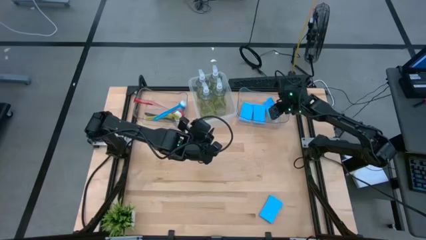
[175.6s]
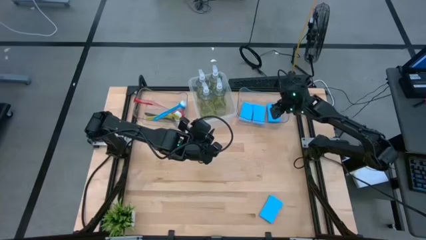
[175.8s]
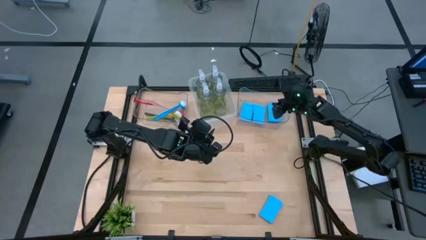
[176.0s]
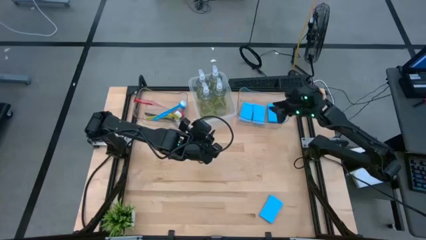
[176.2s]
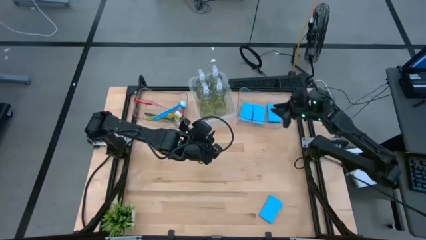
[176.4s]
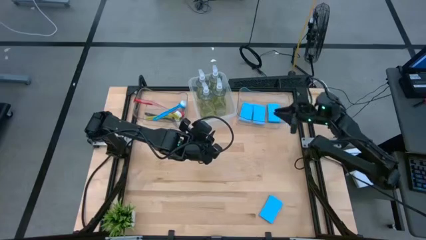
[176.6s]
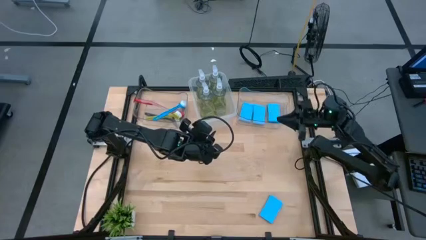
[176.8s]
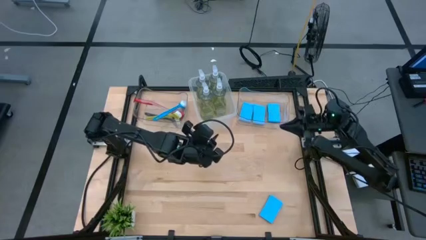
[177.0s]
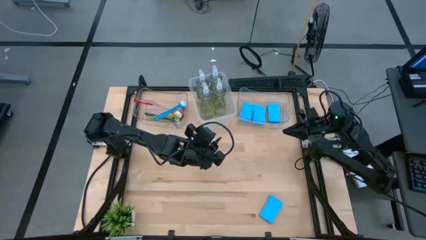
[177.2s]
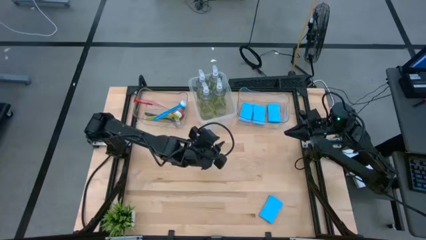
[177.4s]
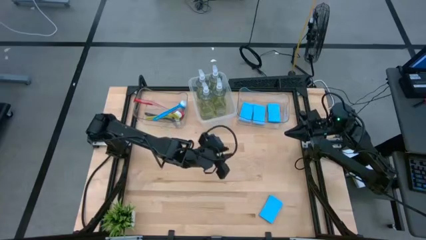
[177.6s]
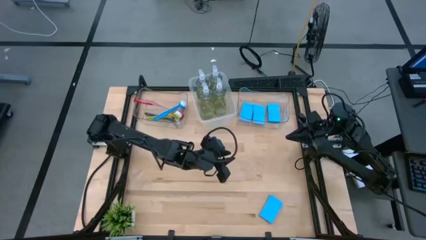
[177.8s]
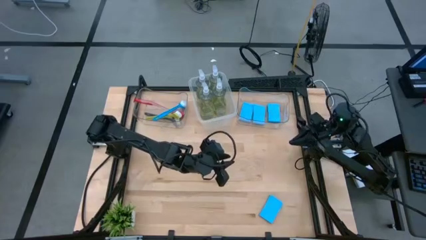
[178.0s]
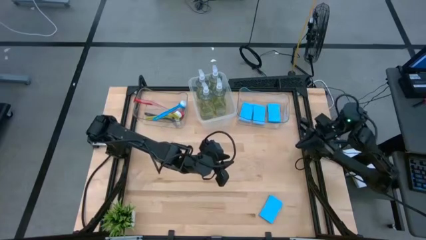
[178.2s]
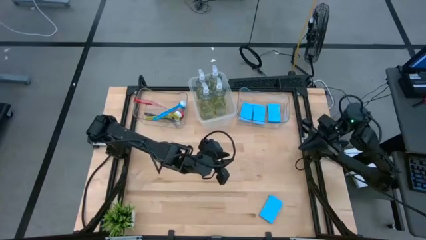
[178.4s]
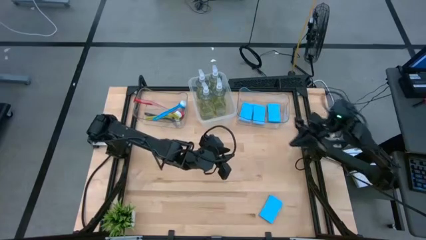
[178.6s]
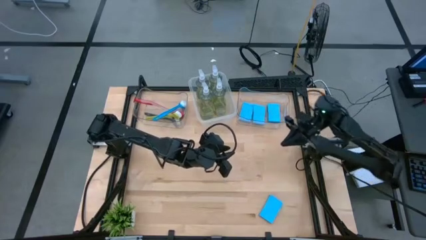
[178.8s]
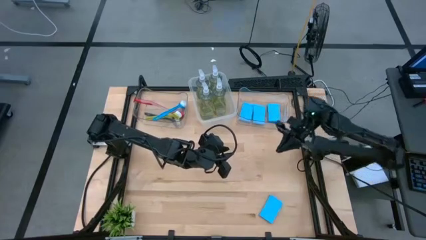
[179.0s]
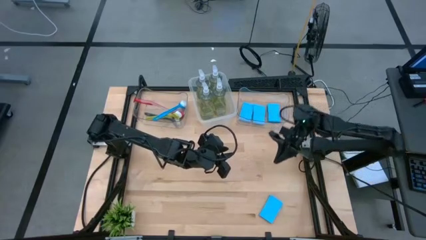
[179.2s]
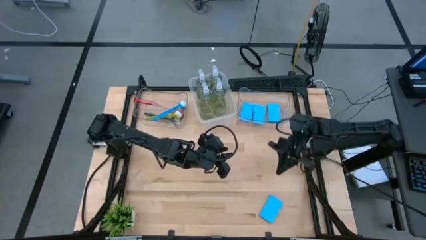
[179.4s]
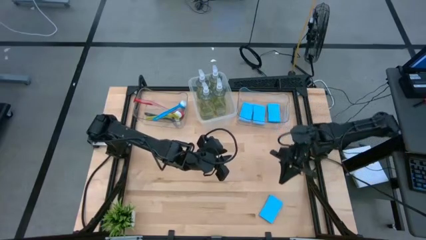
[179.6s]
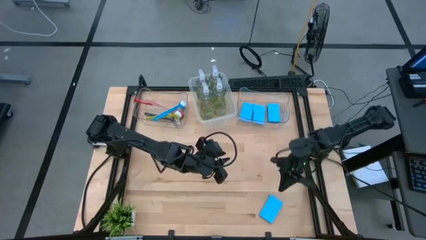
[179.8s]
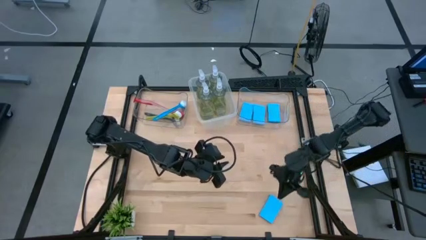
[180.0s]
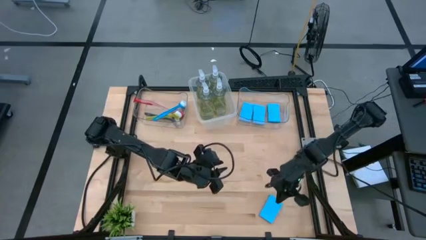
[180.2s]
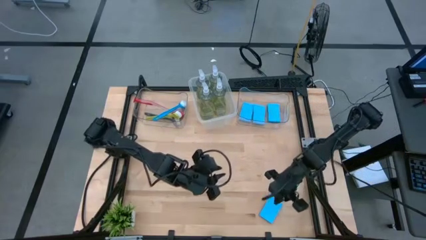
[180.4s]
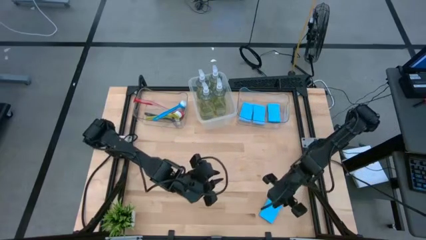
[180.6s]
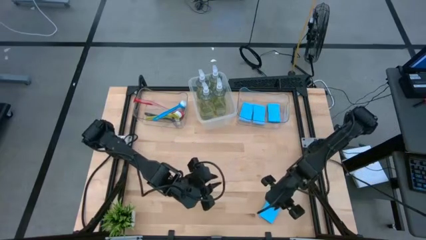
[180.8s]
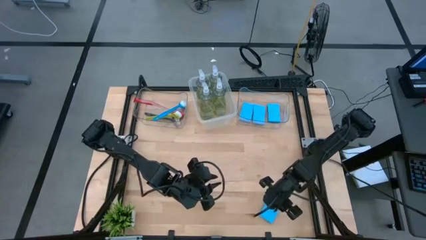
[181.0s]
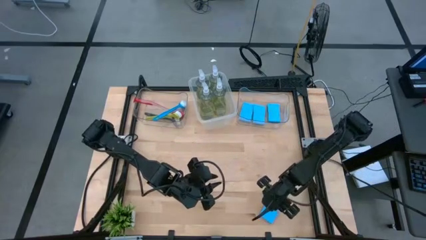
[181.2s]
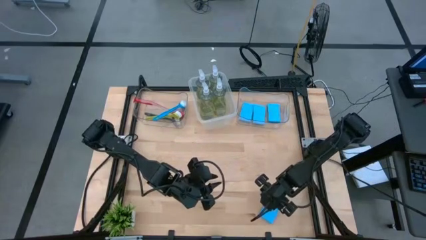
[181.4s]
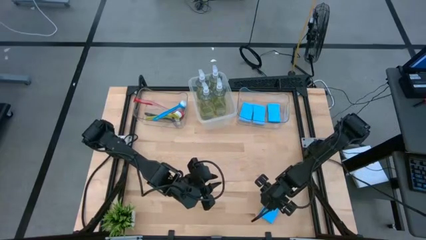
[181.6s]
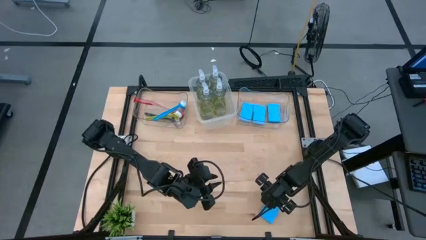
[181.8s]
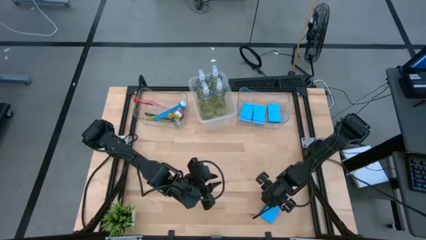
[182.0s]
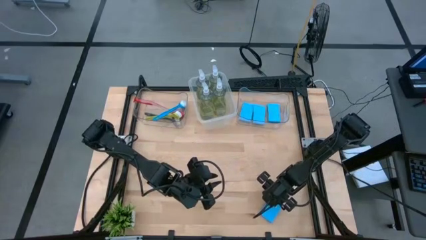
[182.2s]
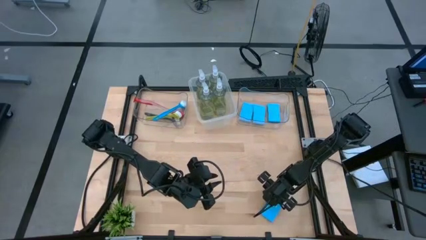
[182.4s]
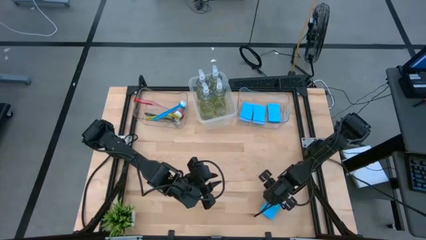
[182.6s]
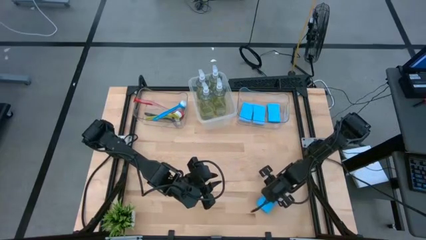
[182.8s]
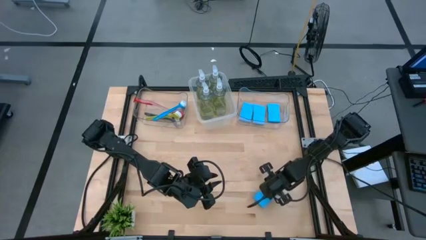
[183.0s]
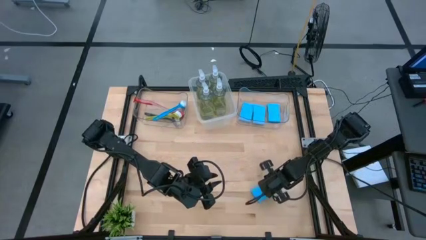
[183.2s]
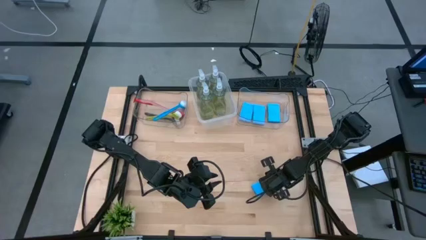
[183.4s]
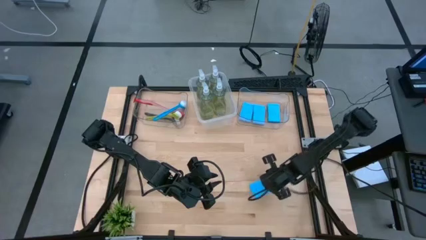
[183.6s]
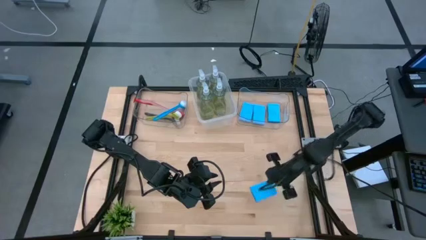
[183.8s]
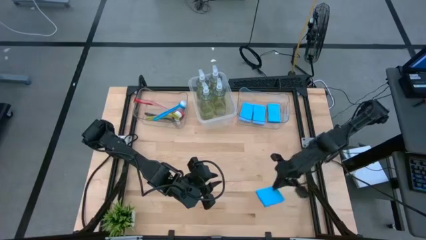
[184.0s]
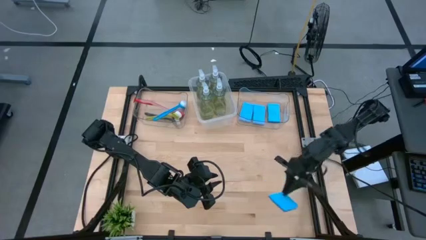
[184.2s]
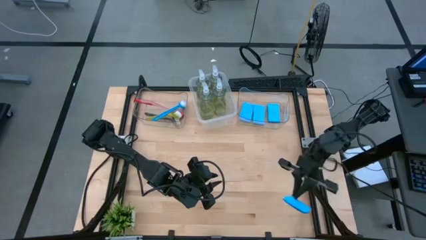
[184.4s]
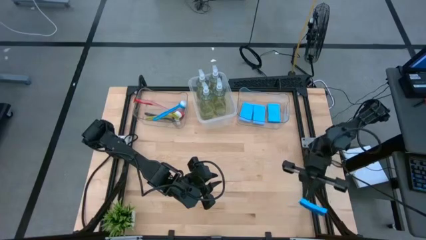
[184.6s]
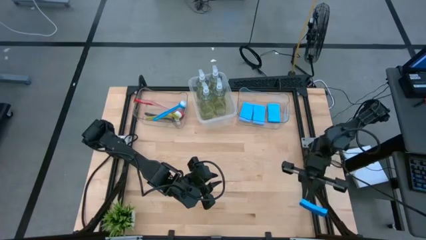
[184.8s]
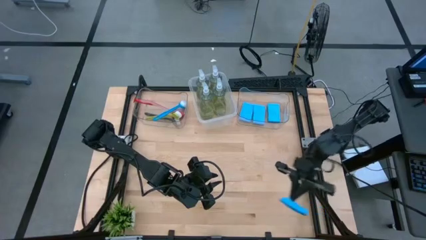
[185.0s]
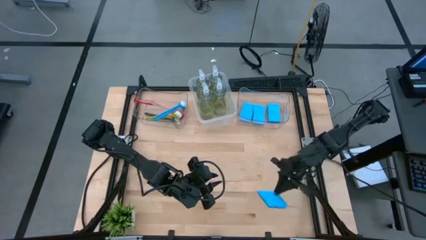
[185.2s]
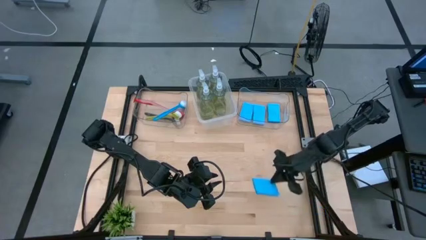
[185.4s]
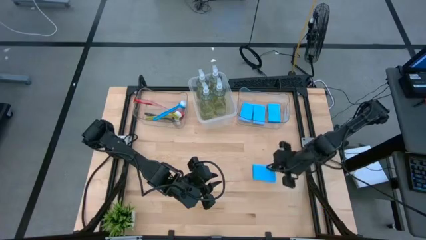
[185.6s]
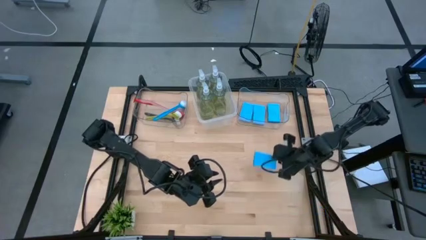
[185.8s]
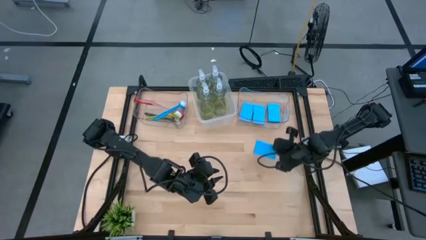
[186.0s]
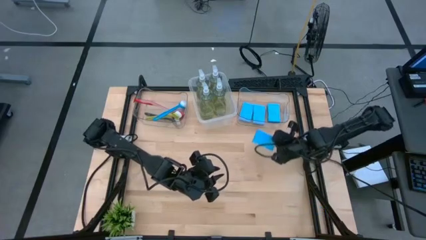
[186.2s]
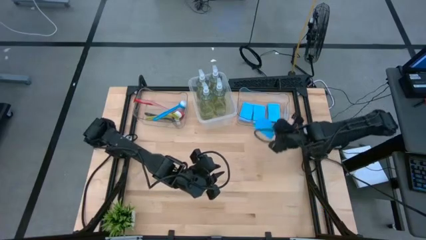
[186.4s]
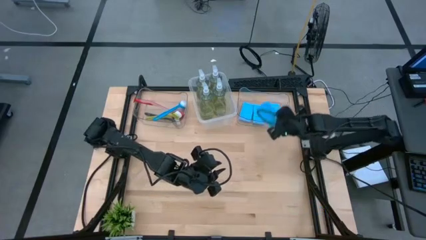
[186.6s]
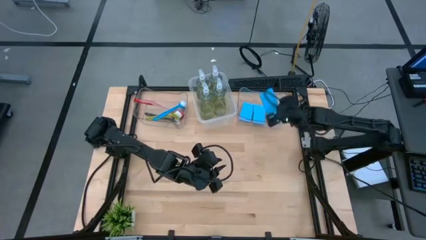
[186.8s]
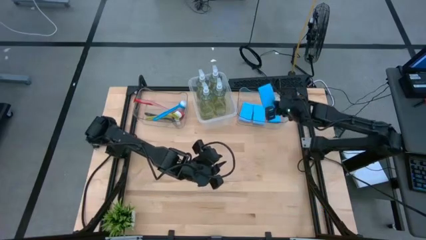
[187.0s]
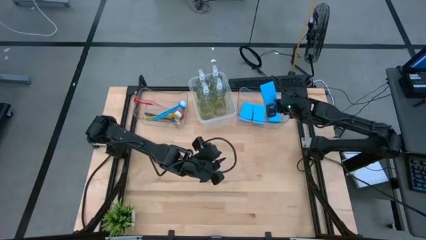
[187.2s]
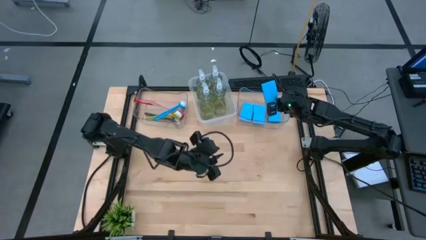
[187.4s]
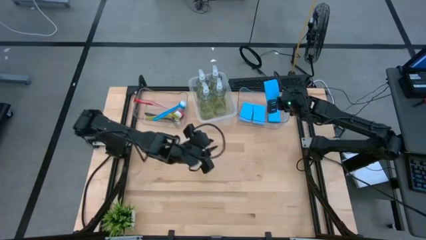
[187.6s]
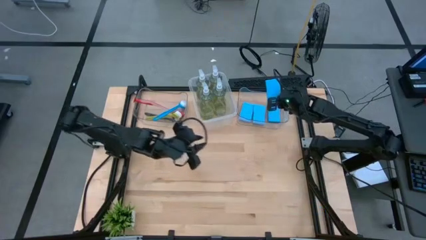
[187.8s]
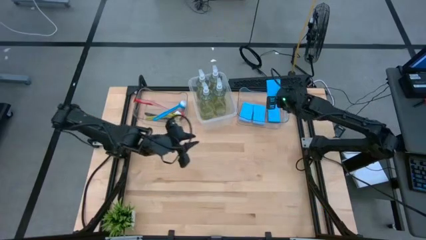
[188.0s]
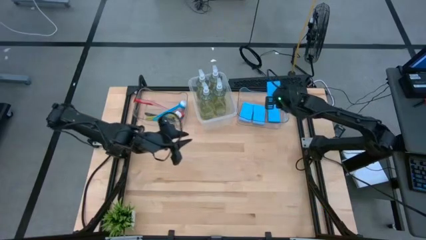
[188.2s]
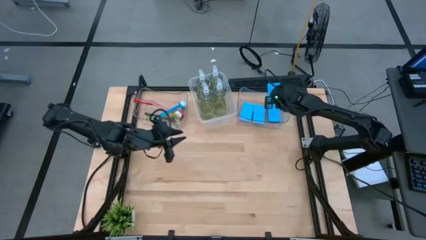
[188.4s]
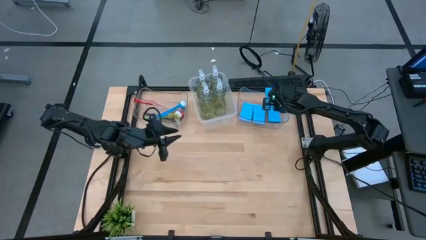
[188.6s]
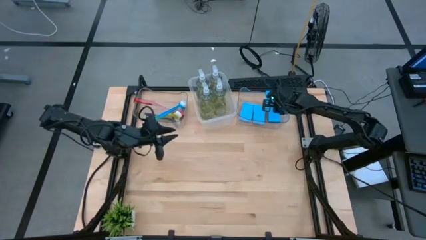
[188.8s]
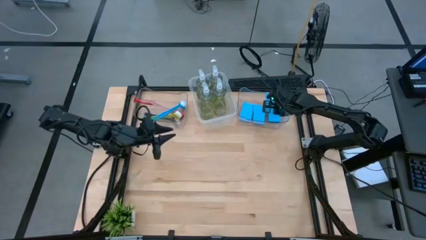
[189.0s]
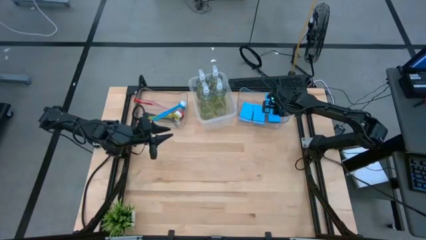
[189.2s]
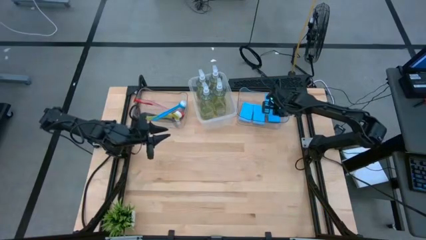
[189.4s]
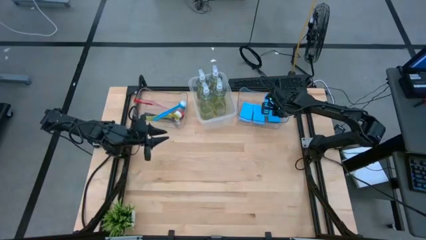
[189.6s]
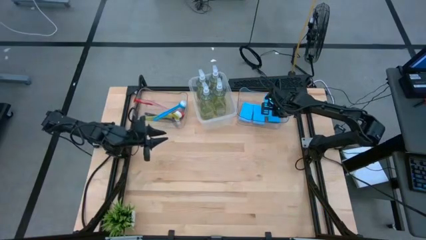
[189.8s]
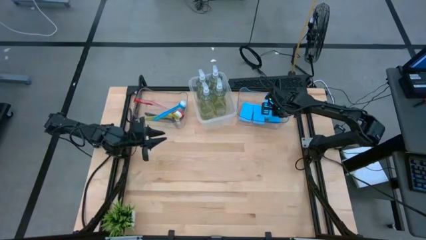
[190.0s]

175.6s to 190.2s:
Task: Pick & Place Kitchen Sink Supplies
Put the blue sponge into the right transparent bin
